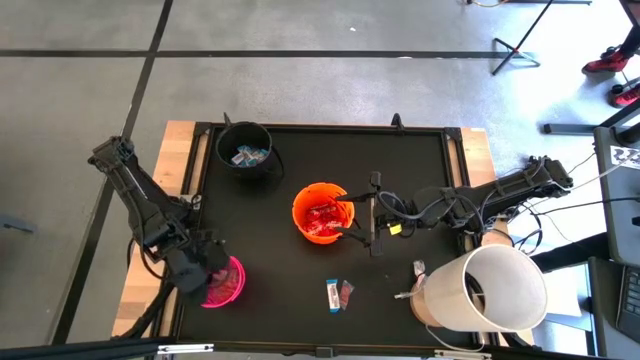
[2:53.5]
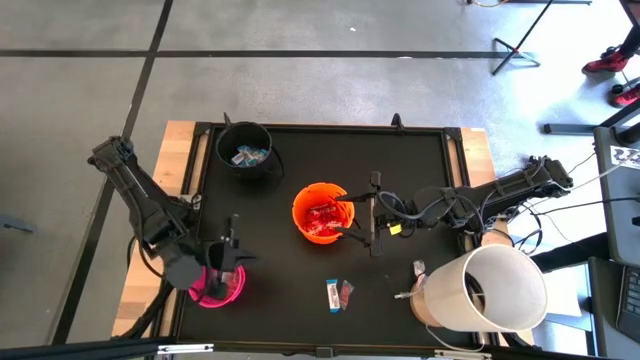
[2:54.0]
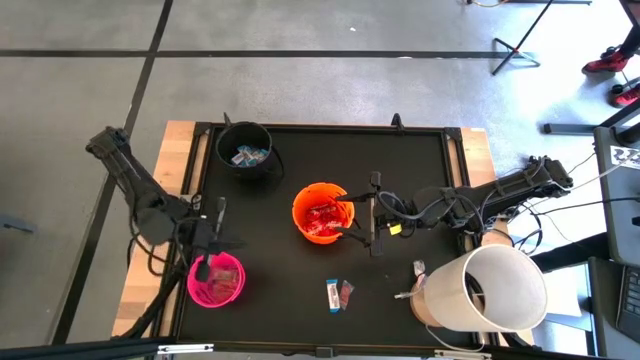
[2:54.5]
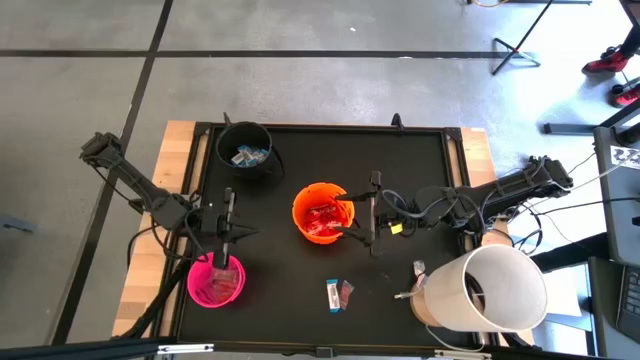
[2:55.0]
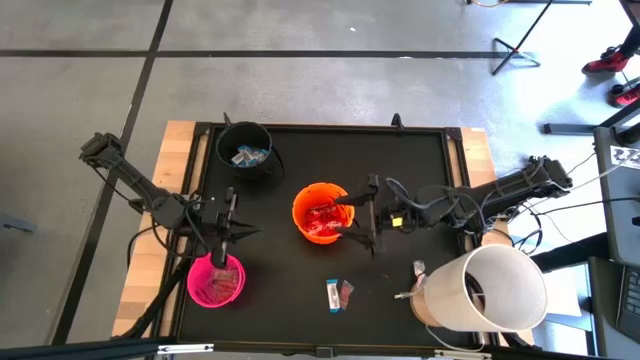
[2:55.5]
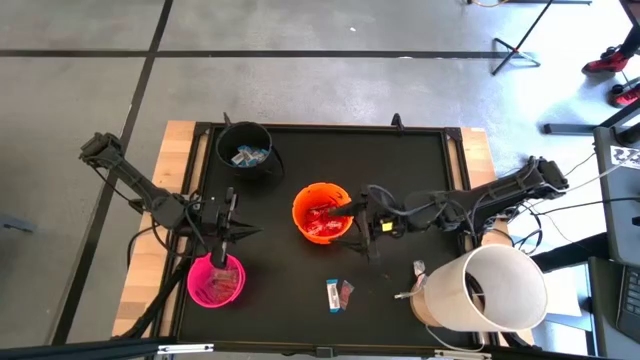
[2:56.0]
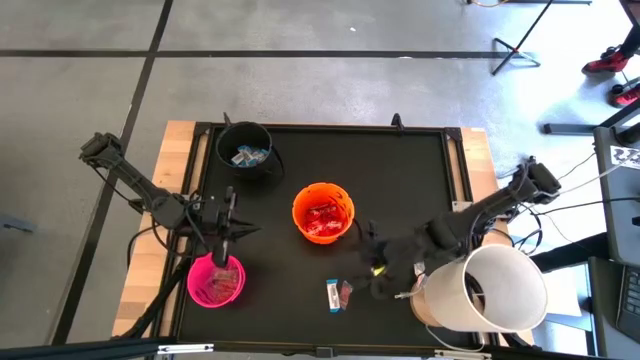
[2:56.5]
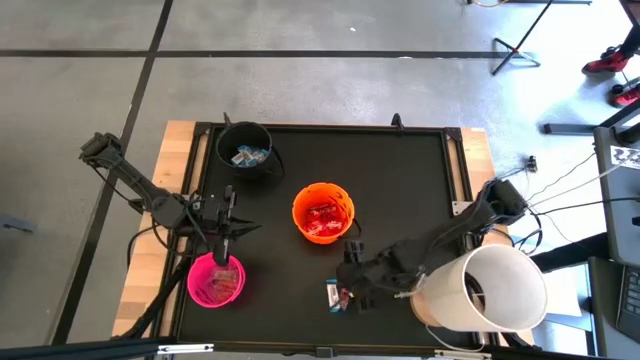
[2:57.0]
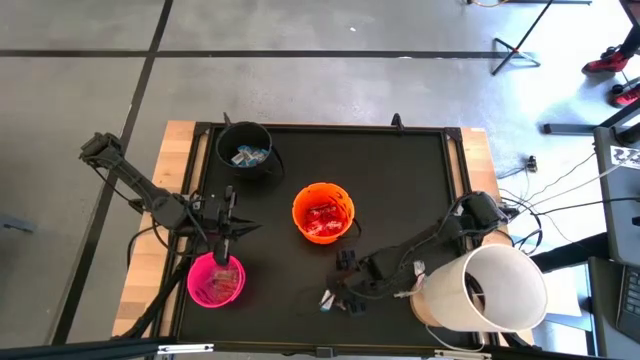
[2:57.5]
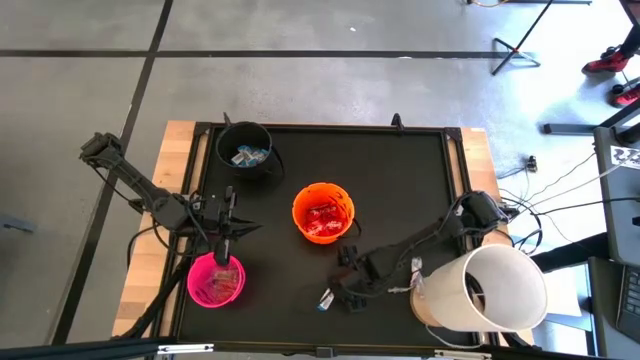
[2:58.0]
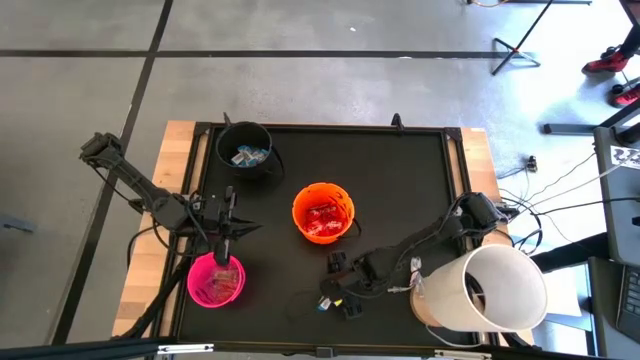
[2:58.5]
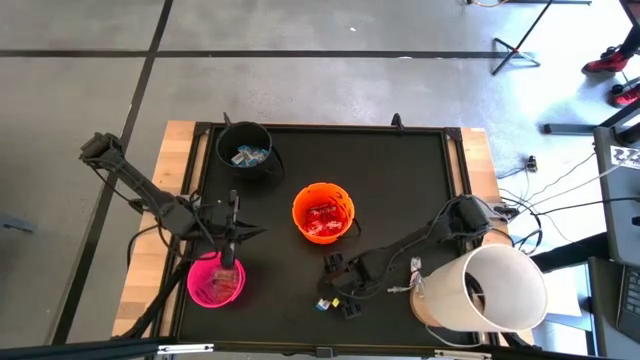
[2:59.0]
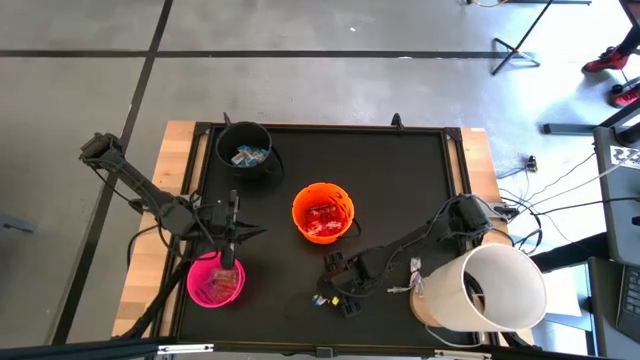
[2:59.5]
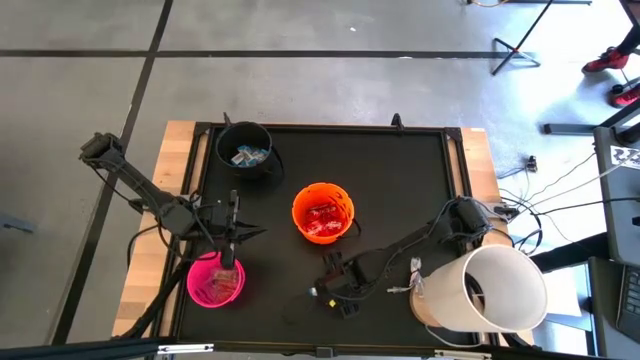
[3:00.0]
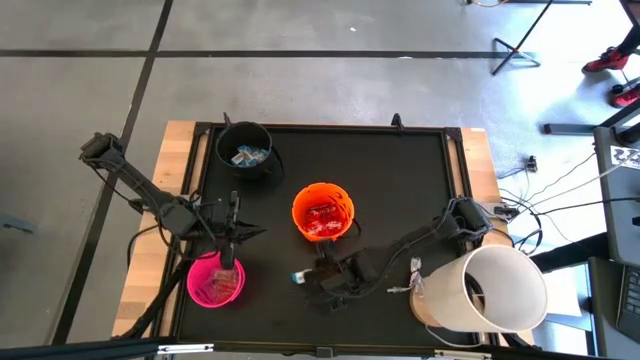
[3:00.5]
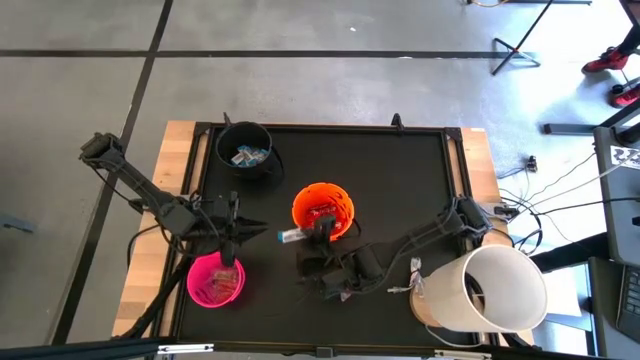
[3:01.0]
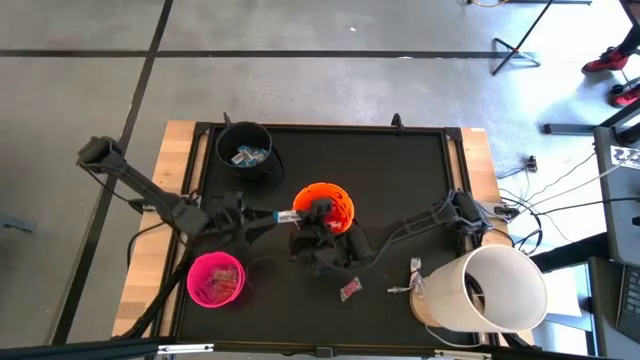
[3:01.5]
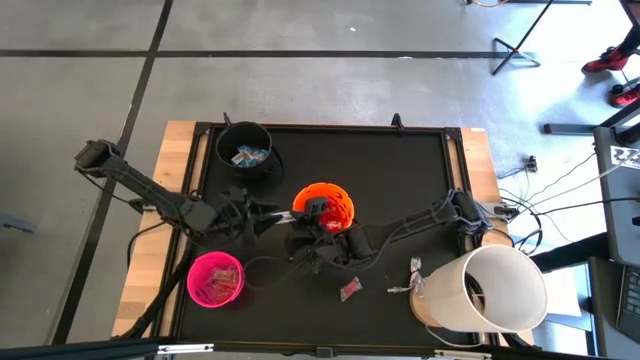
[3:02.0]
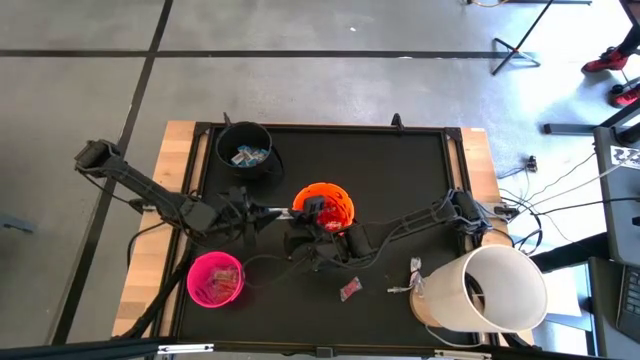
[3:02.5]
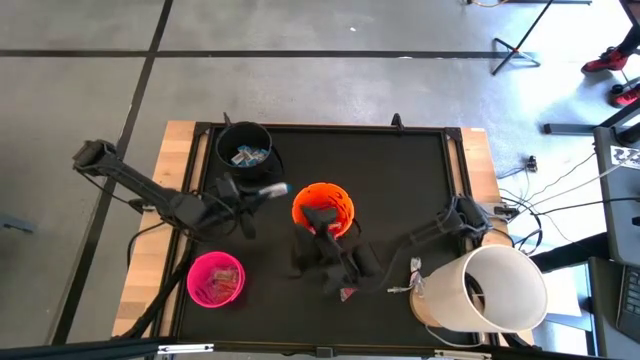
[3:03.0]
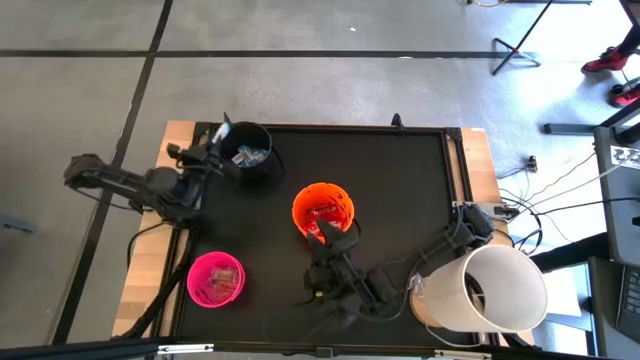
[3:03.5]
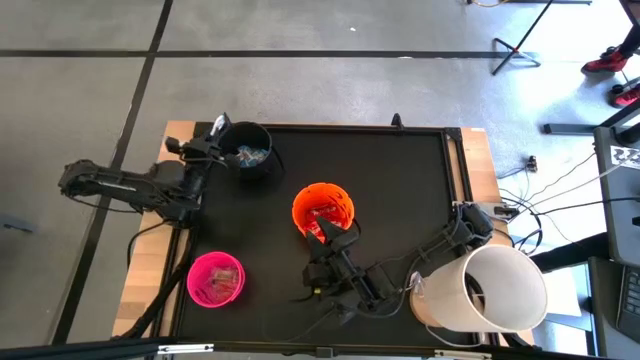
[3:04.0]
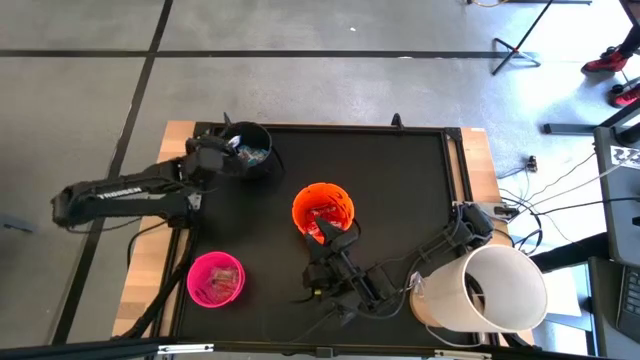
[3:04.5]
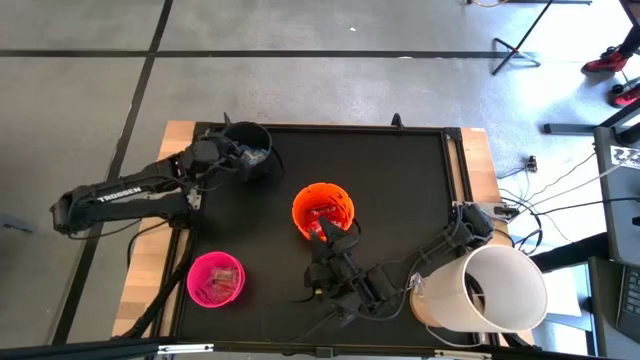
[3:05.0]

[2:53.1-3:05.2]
Task: Sort candy
Put the white chocolate into the black bucket

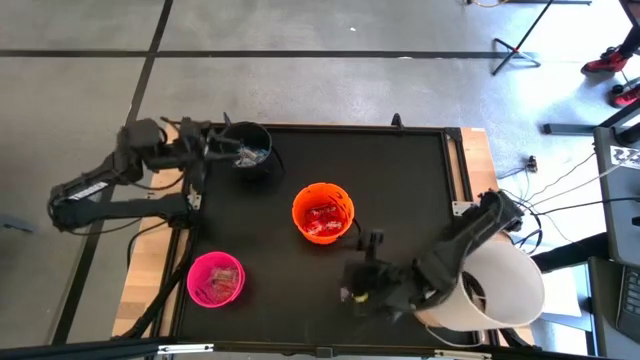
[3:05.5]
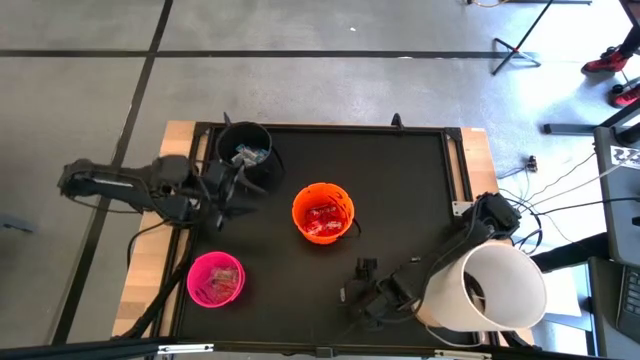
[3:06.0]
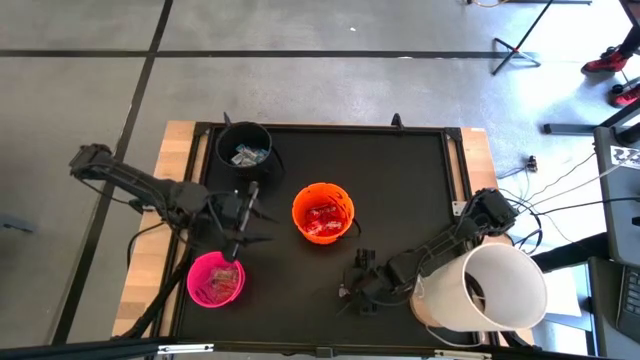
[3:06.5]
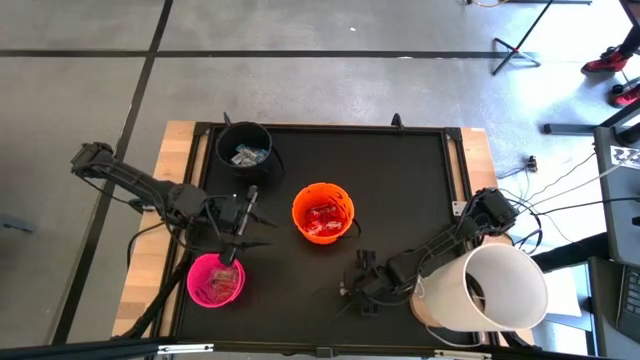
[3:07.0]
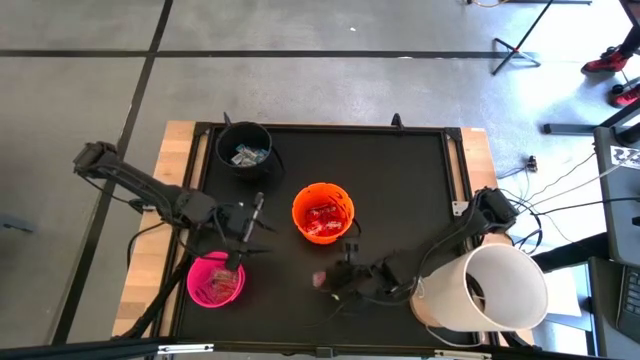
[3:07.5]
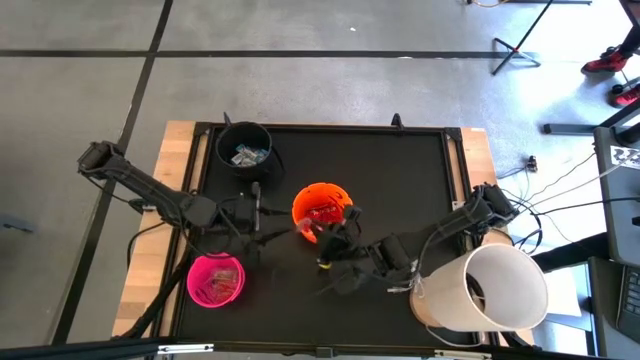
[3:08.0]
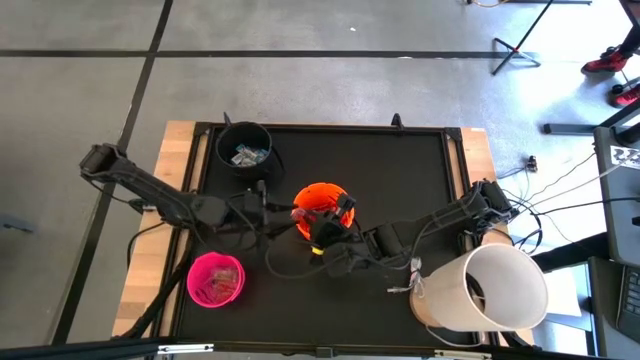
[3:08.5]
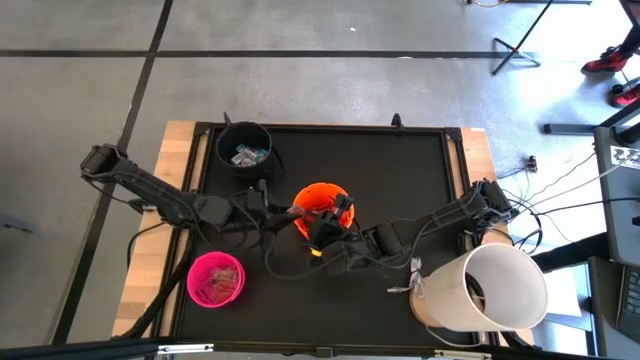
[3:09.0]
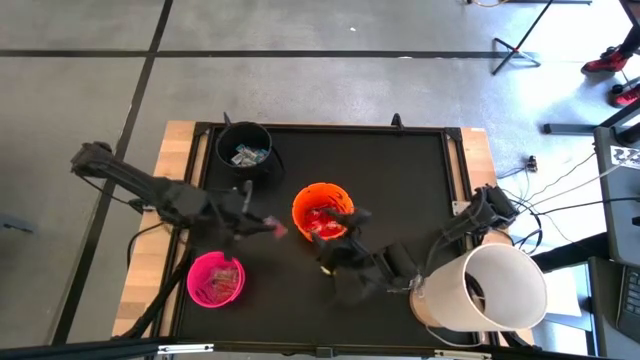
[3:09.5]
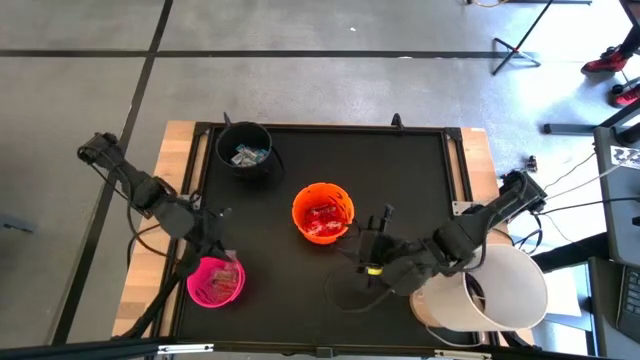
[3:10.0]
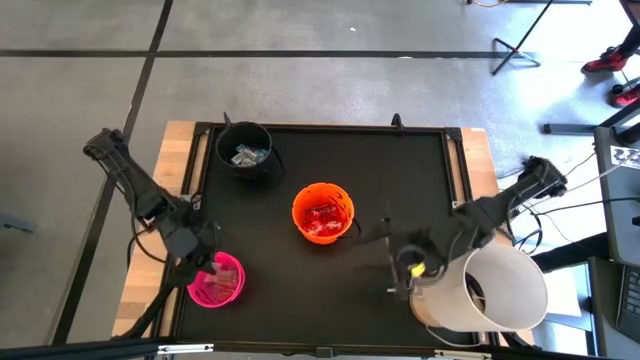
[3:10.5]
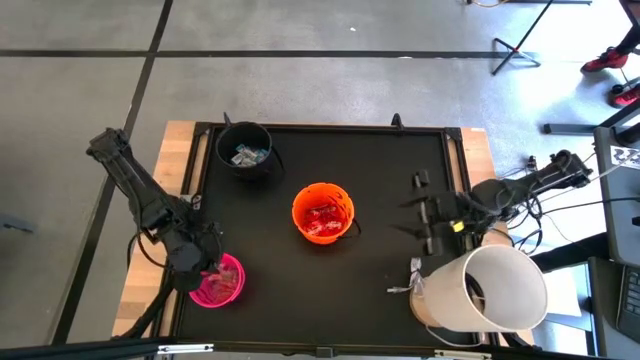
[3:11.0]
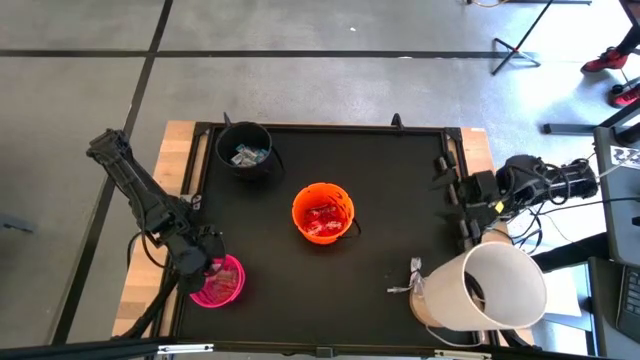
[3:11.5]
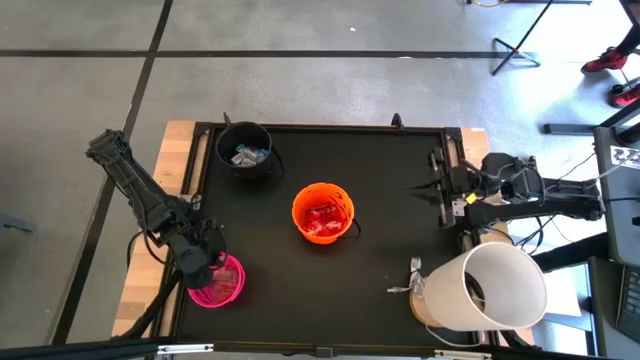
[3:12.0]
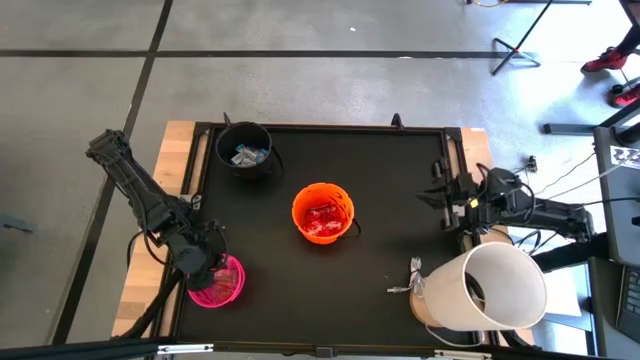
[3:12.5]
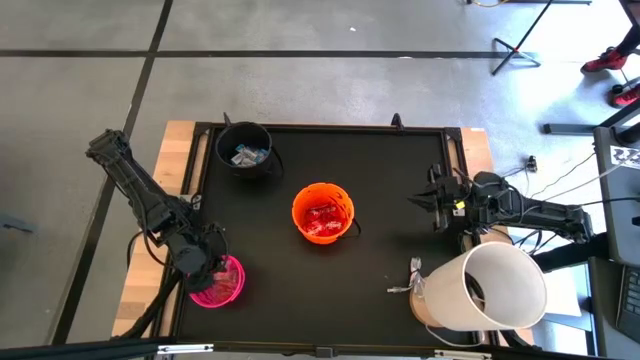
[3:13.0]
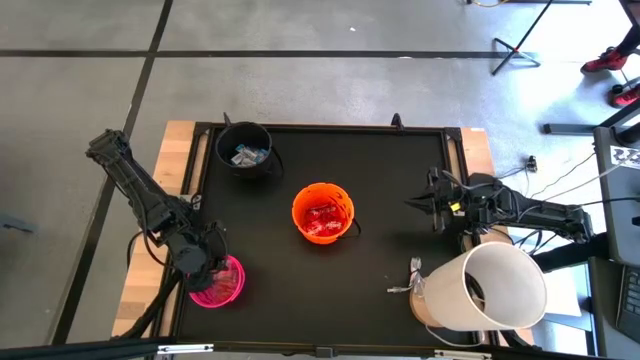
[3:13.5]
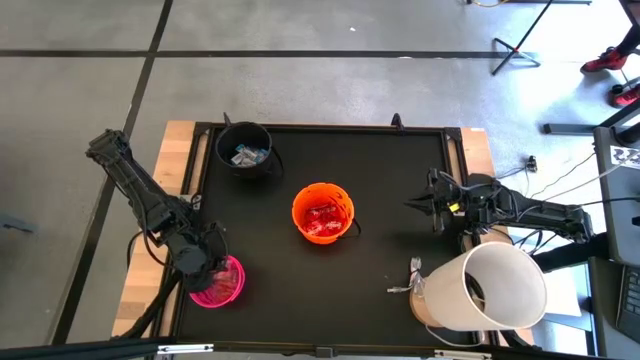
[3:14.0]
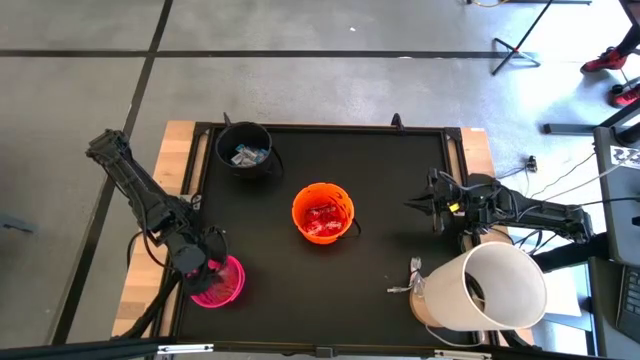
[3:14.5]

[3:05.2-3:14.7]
Put the transparent candy into the pink bucket
